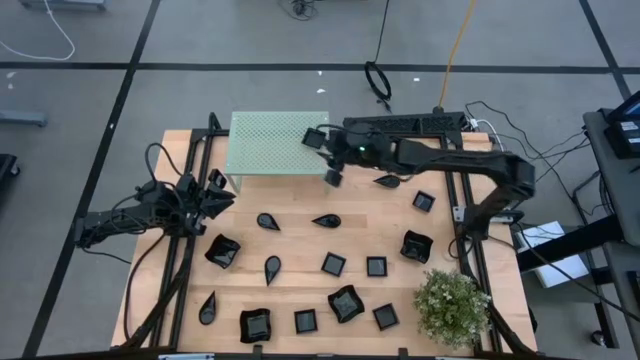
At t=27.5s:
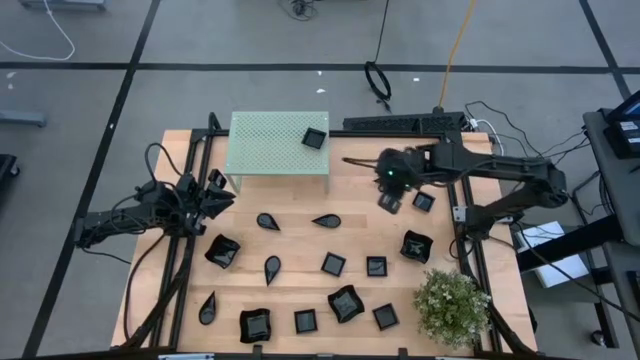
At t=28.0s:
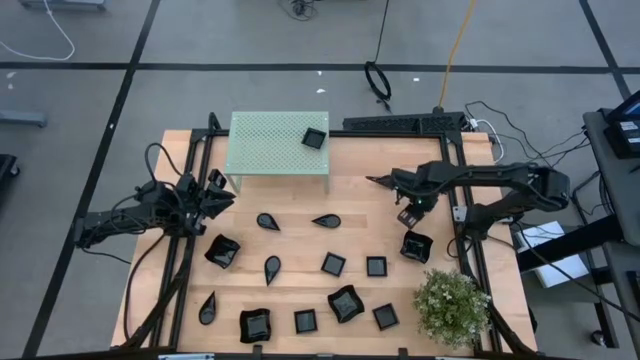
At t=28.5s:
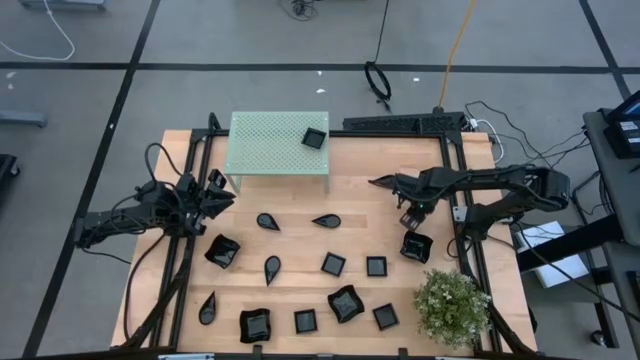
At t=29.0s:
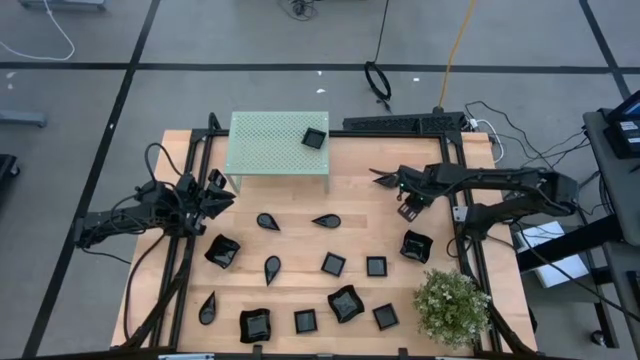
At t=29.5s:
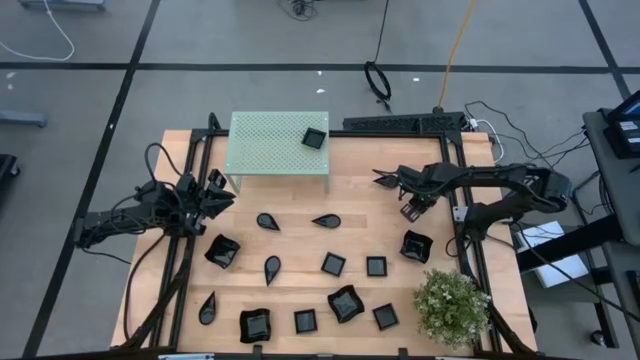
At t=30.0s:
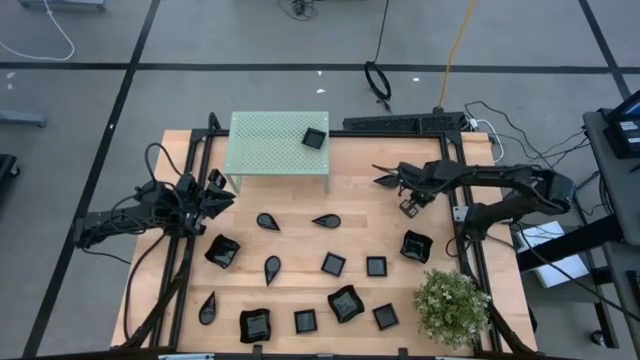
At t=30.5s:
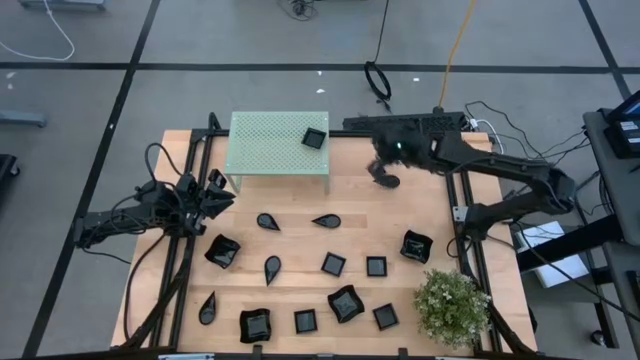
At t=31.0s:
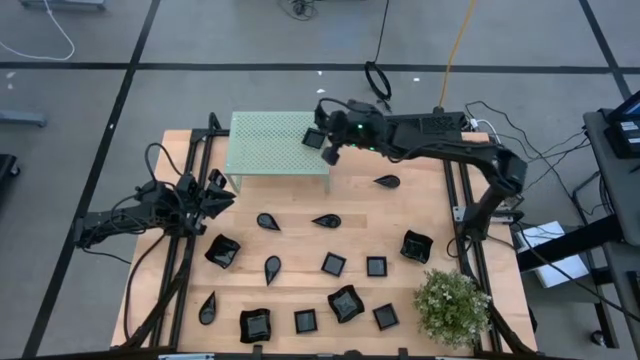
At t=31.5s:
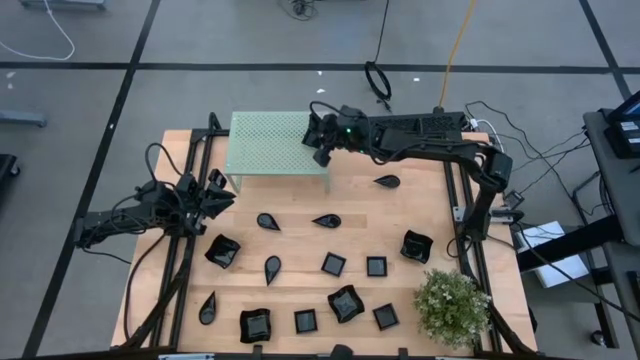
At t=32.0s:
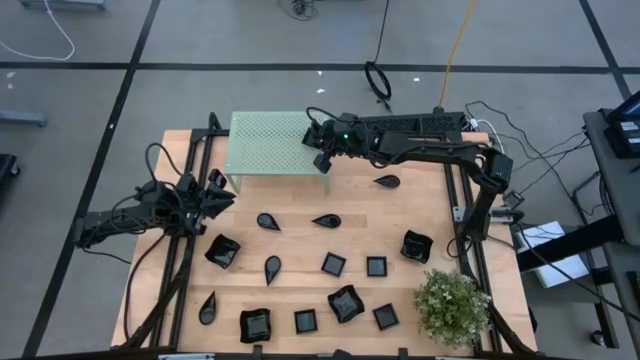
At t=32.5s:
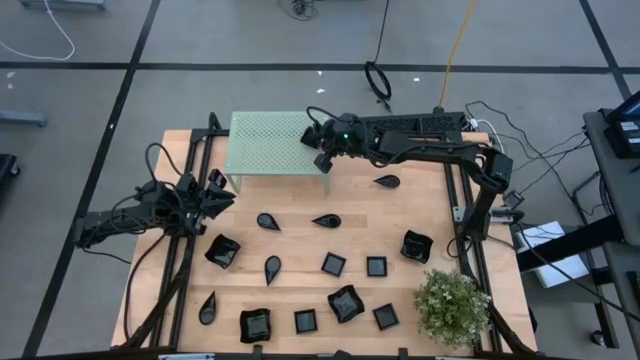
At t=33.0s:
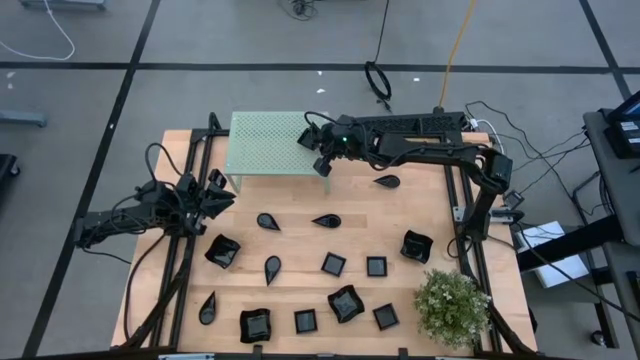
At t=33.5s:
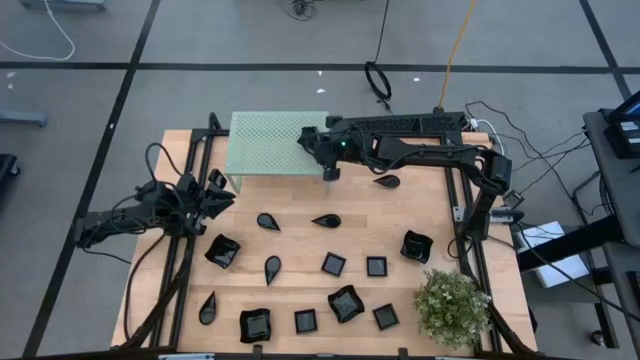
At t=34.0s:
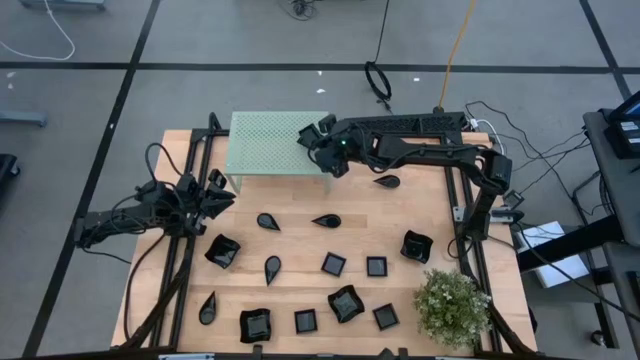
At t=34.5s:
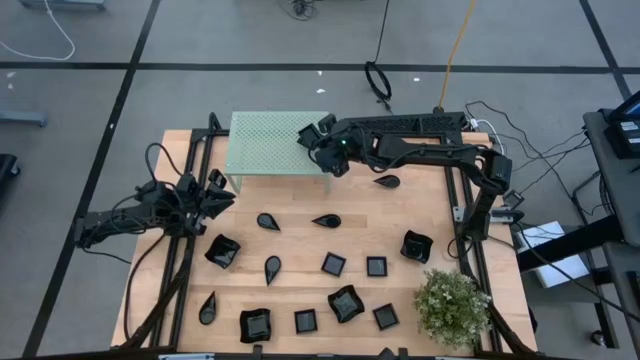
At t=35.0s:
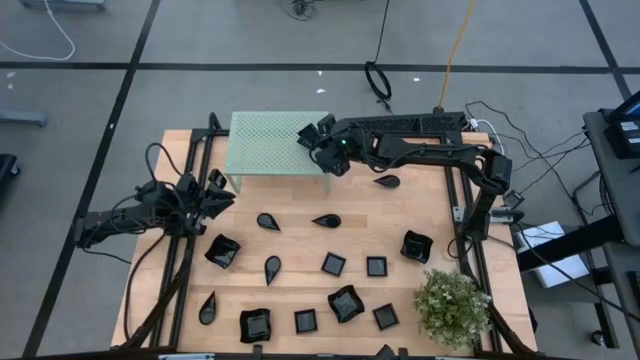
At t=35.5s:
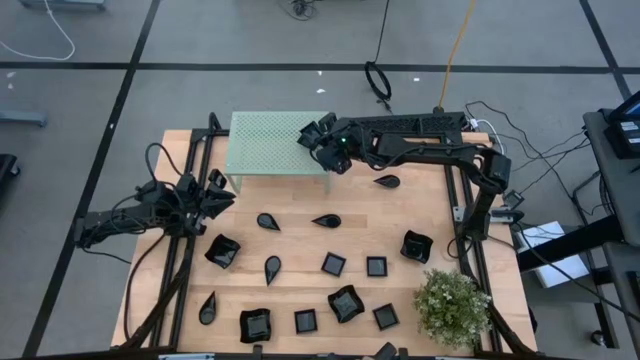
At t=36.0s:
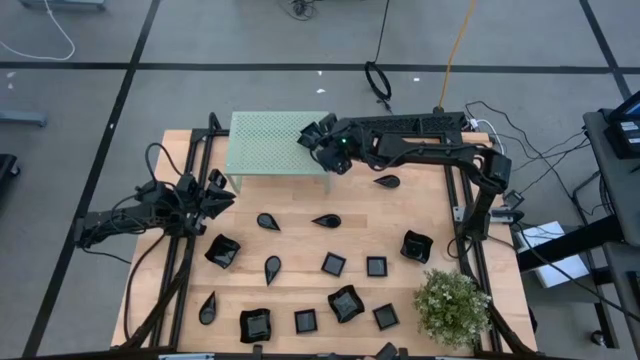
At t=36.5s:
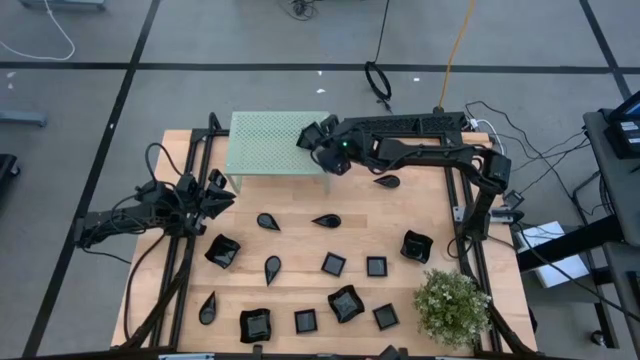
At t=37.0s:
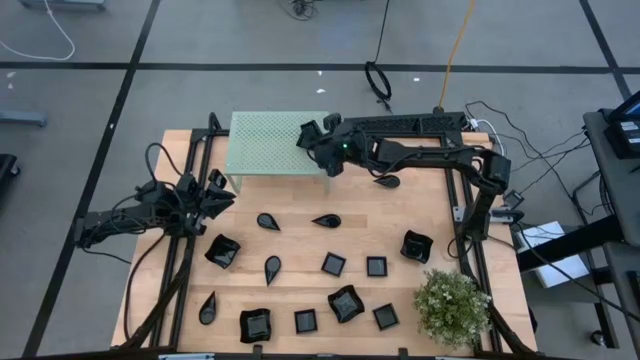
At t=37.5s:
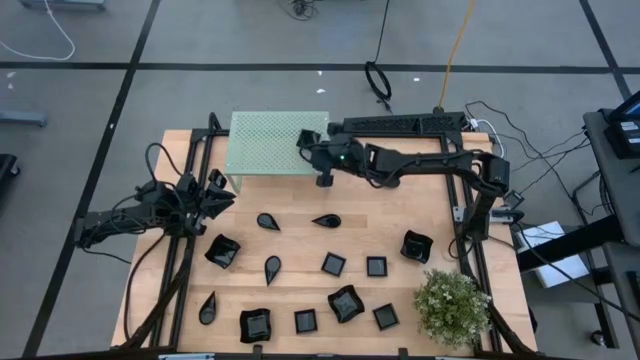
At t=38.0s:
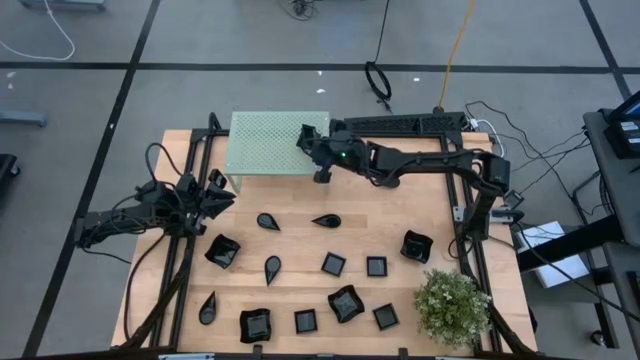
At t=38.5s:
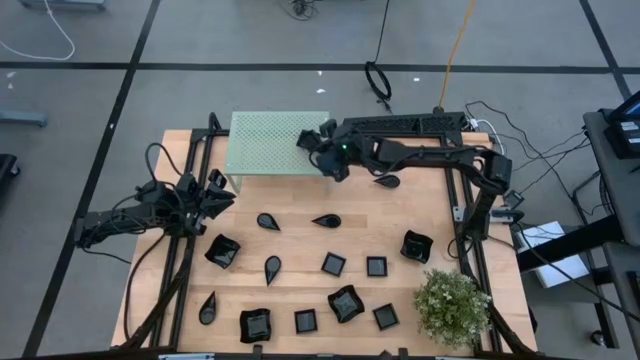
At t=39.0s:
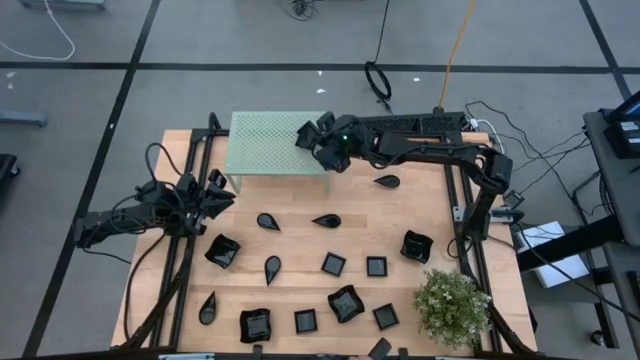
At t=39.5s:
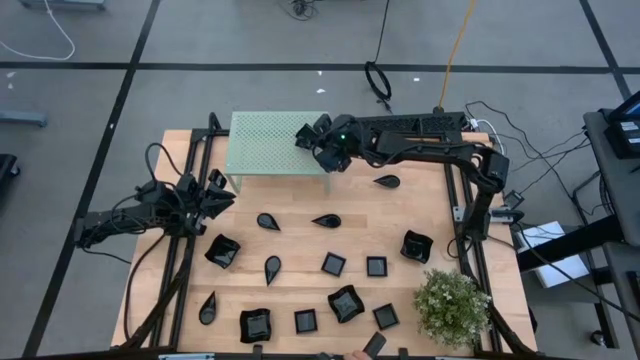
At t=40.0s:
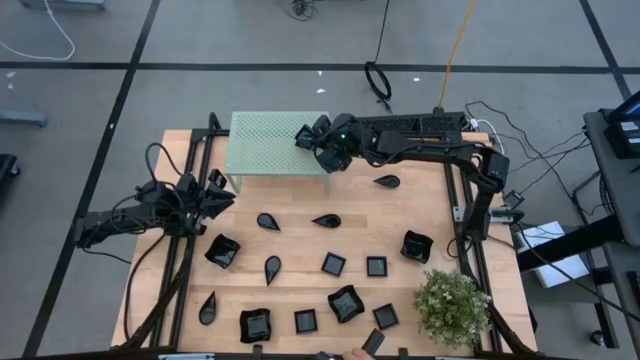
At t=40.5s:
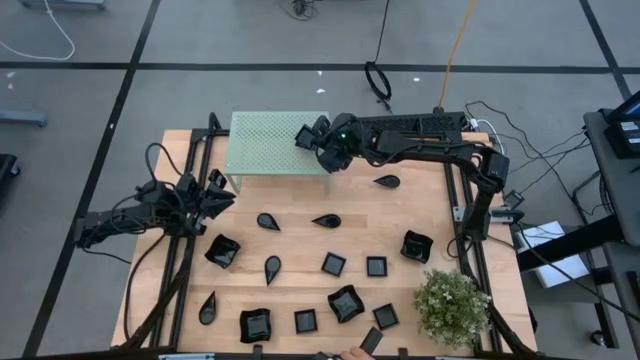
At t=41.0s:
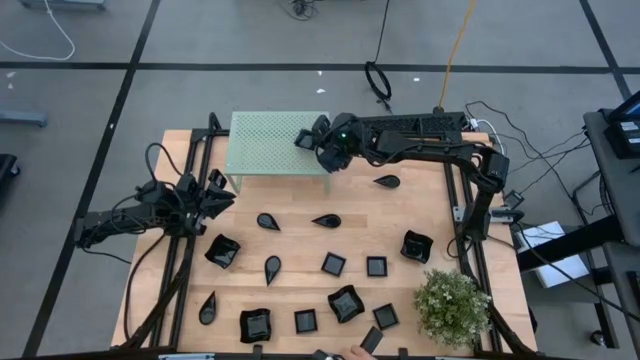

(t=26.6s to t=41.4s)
Task: Pick & Place Mini shaped plates
Stack the square plate on top of the stacked square plates on the shelf

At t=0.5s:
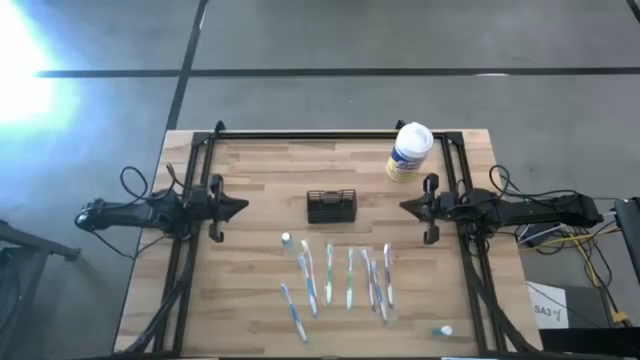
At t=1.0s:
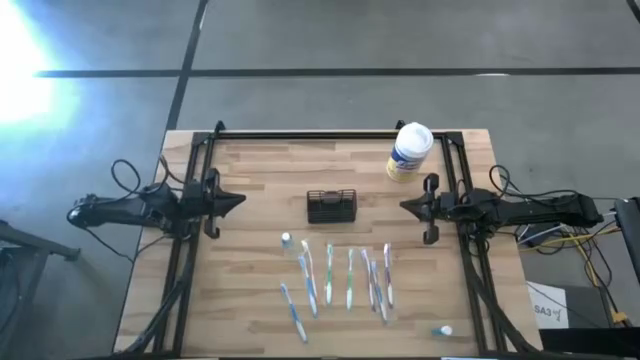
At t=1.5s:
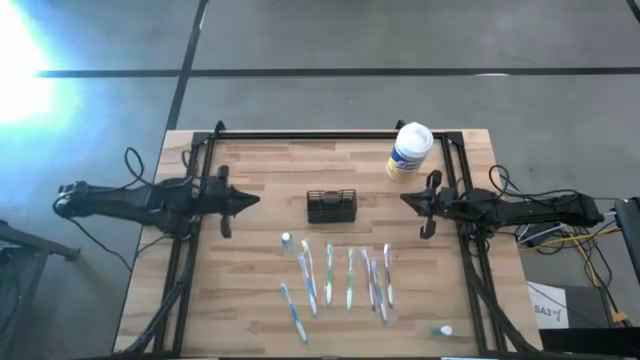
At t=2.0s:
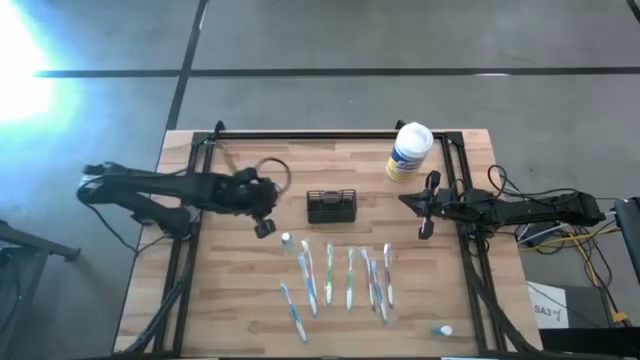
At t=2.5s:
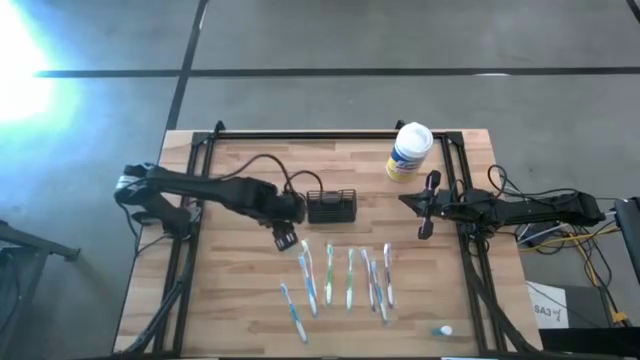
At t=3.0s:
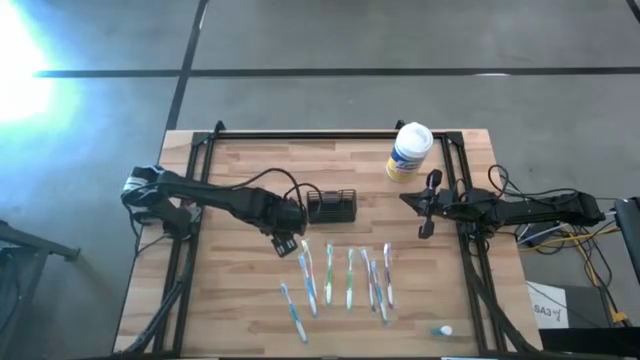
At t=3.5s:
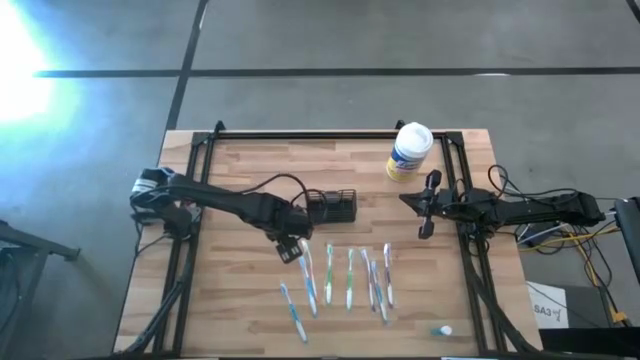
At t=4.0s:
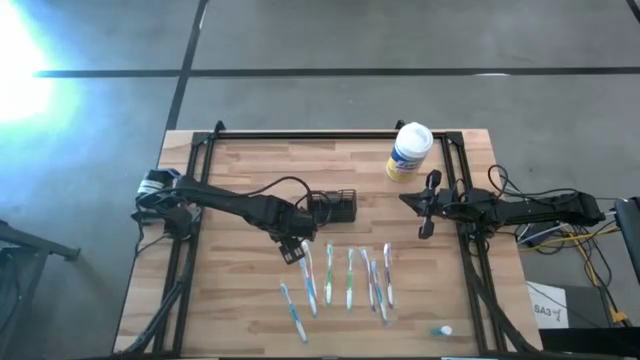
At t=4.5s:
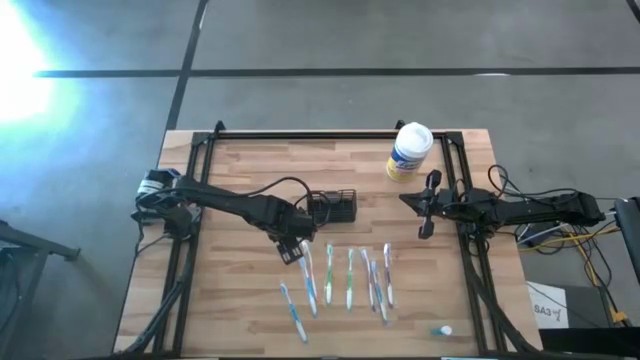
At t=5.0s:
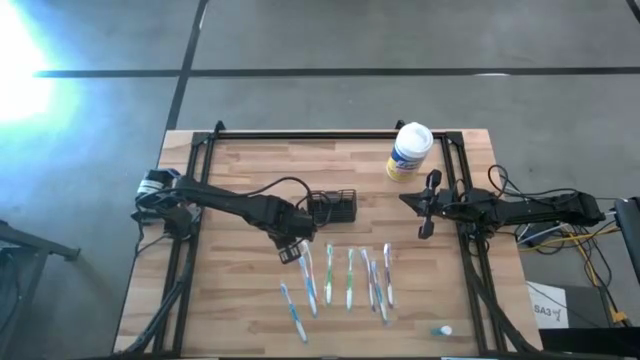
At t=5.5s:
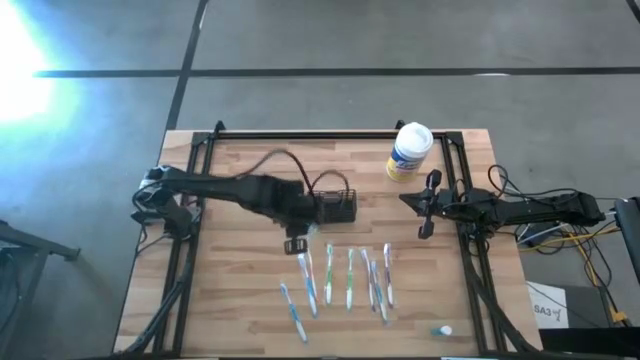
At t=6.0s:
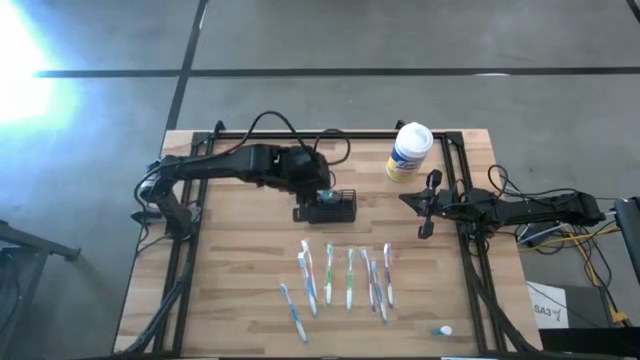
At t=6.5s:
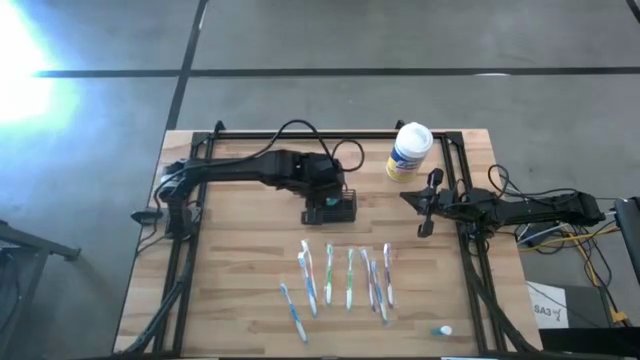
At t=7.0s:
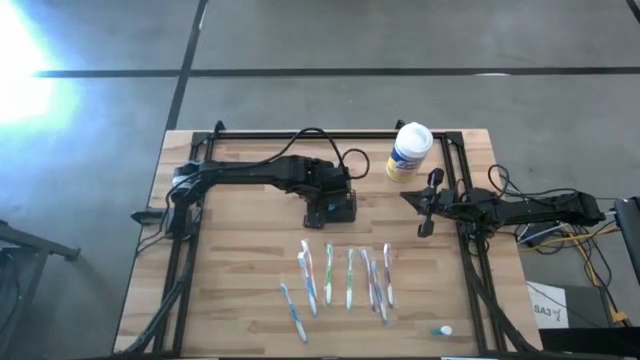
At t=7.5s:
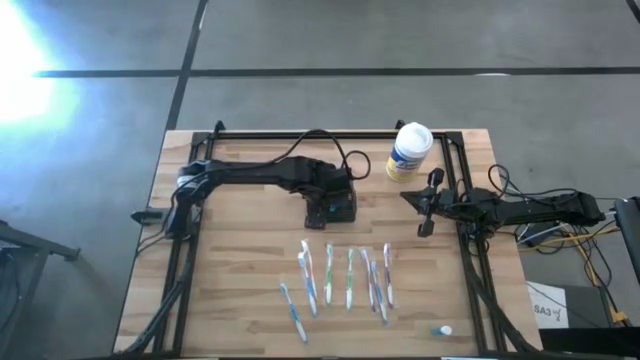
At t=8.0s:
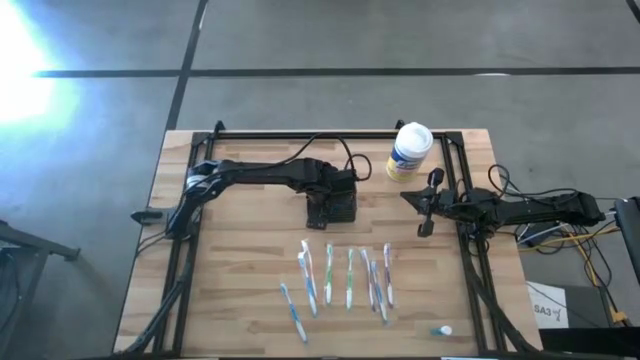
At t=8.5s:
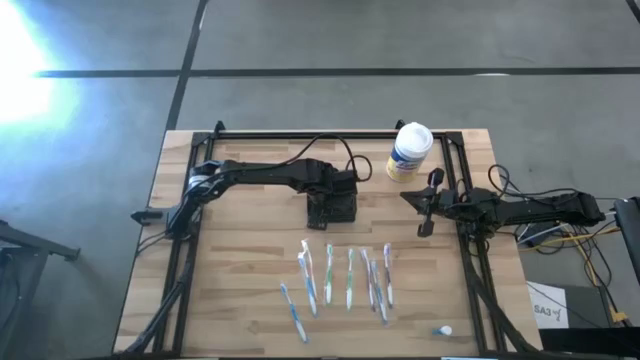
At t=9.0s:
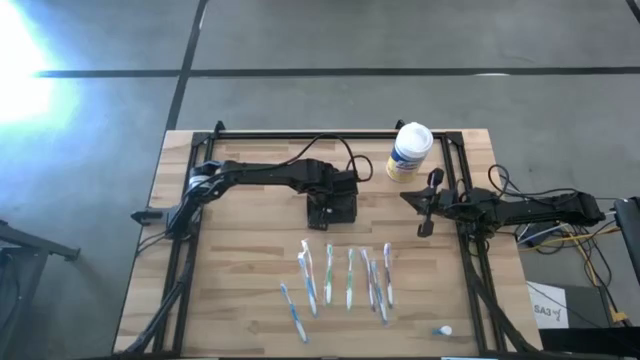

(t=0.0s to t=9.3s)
Task: Pick & Place toothbrushing station
Put the top mouthwash bottle into the black wire organizer
